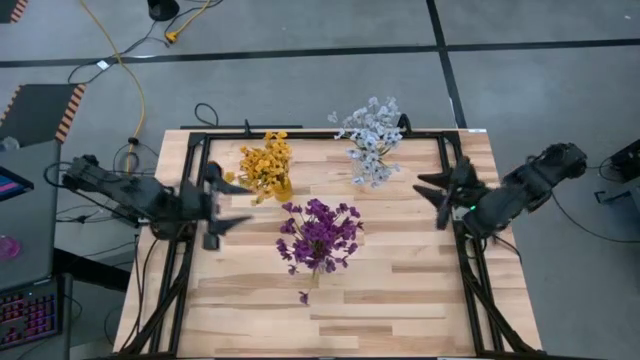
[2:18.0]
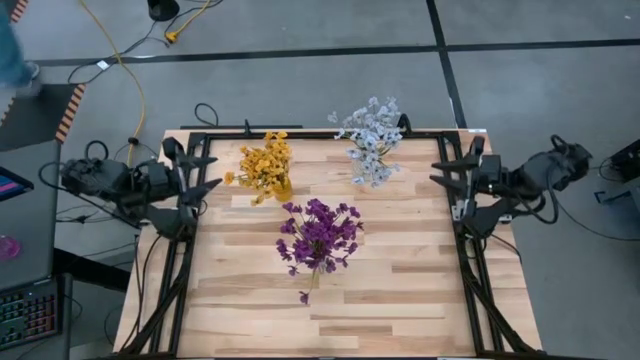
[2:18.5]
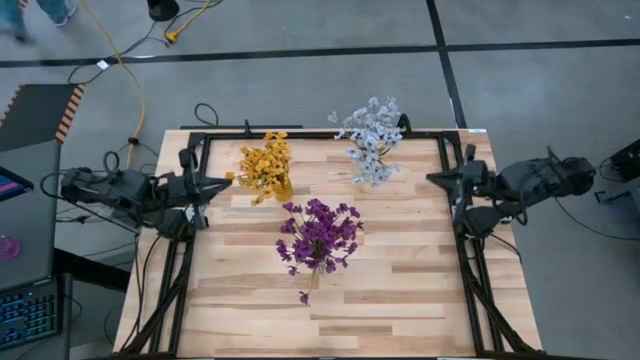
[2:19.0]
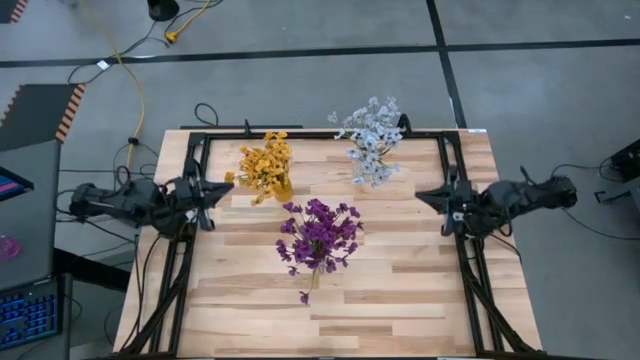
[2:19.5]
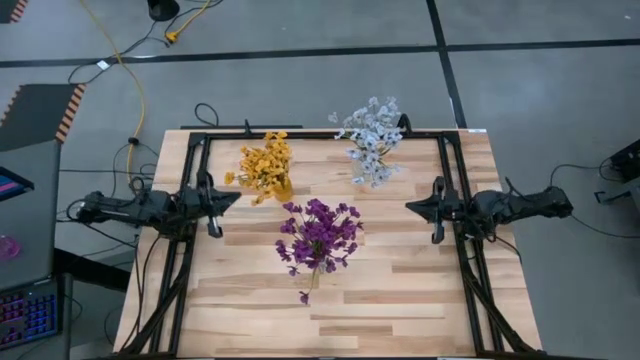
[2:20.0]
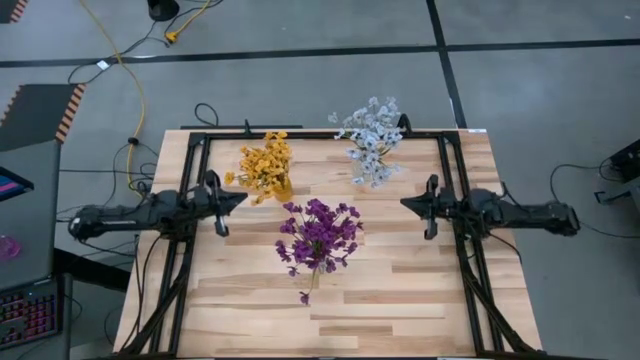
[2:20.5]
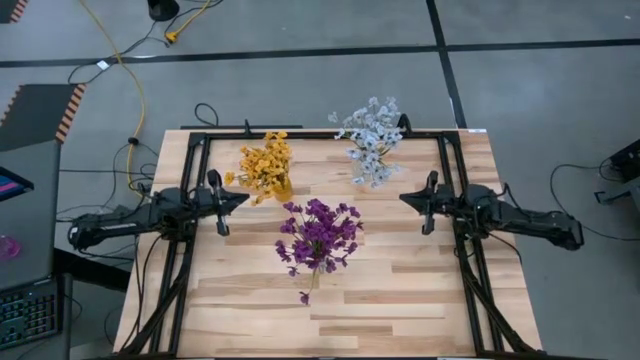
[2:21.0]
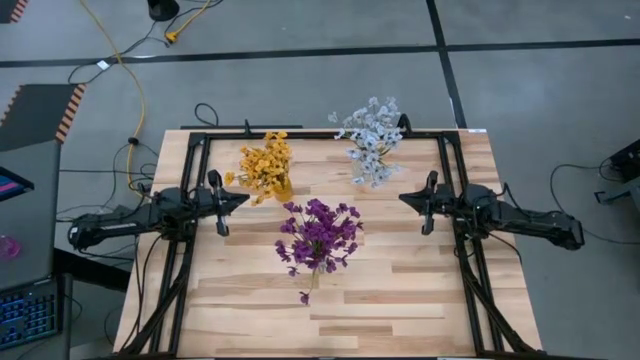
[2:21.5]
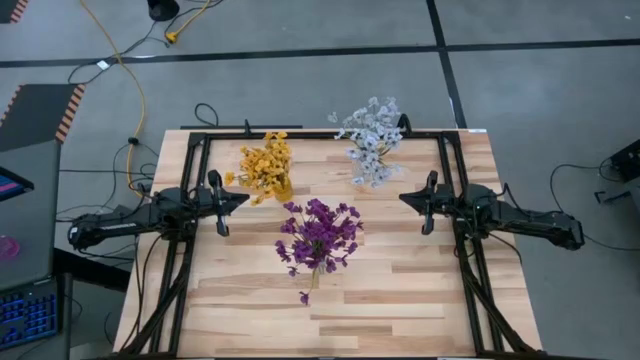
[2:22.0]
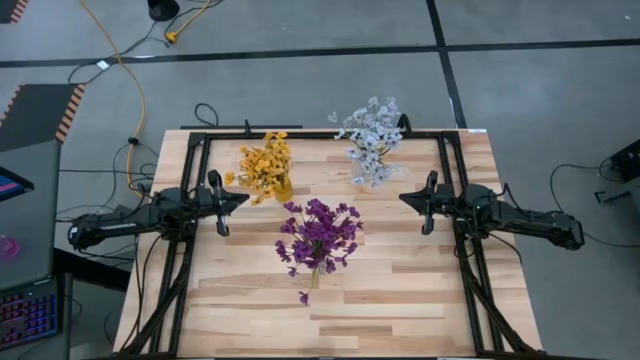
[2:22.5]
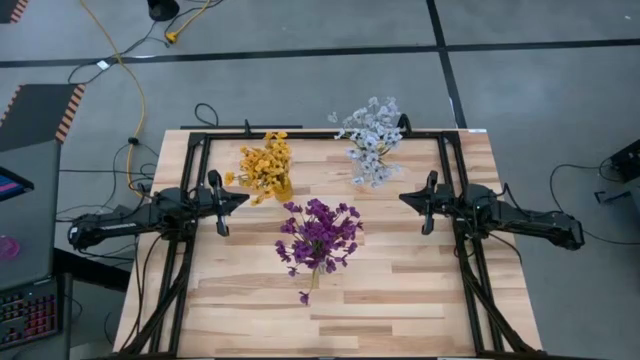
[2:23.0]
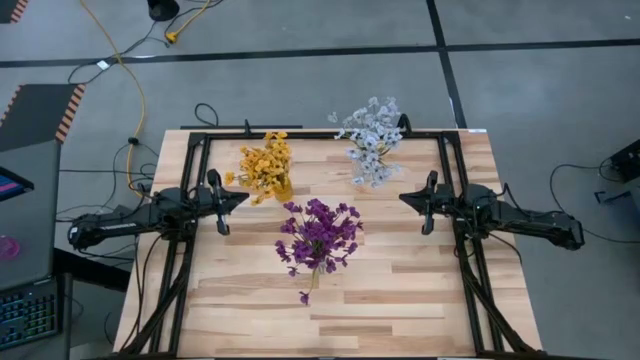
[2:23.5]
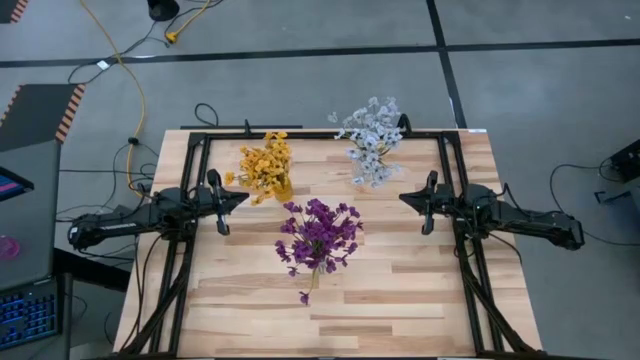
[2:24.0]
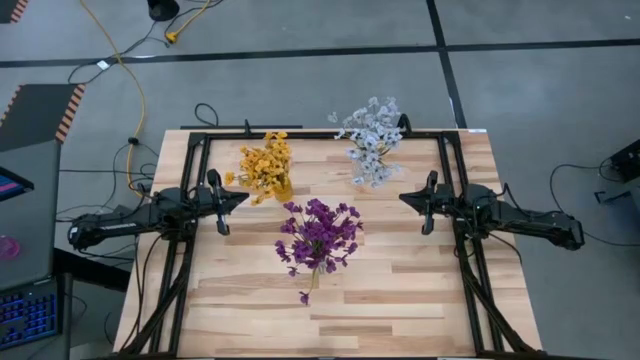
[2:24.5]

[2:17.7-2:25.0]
Task: Sort flowers into vase by color
Return to Home Position

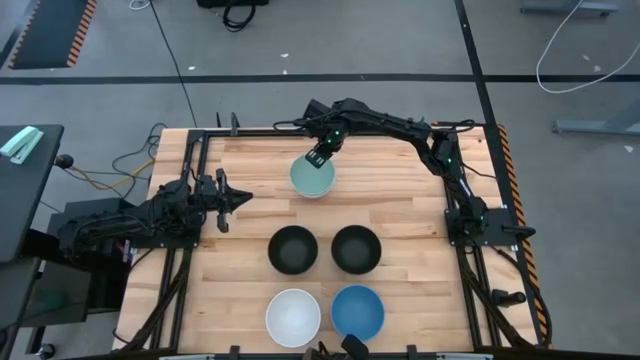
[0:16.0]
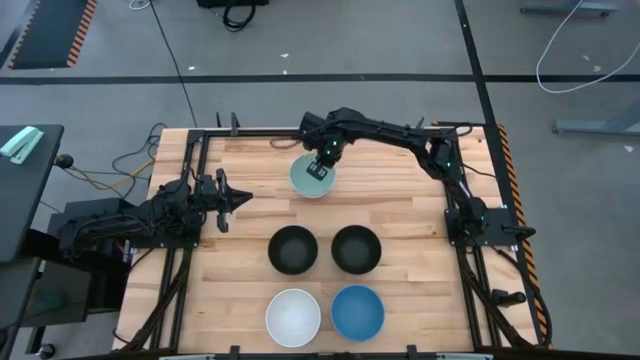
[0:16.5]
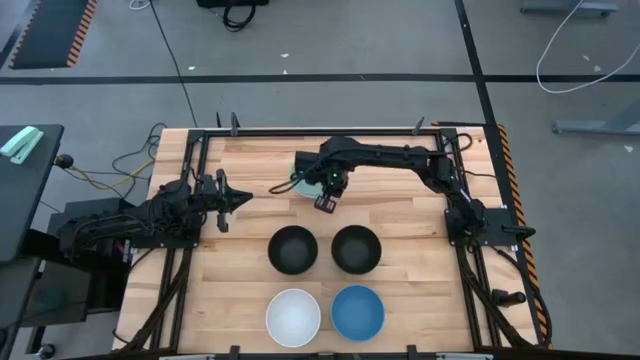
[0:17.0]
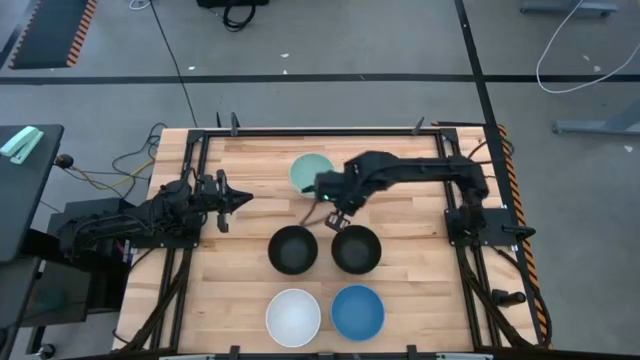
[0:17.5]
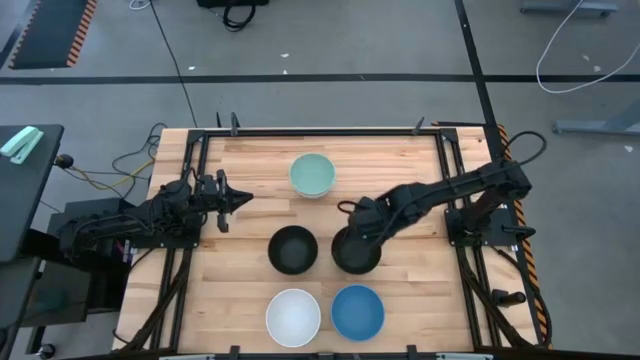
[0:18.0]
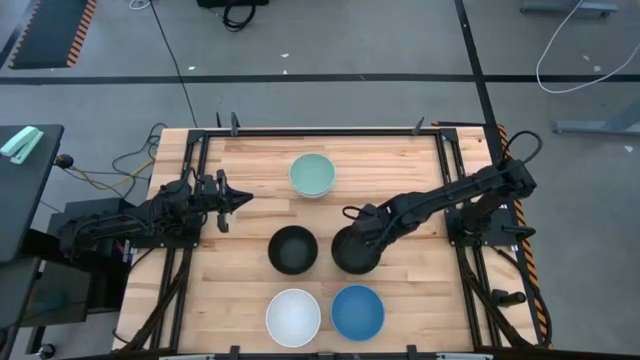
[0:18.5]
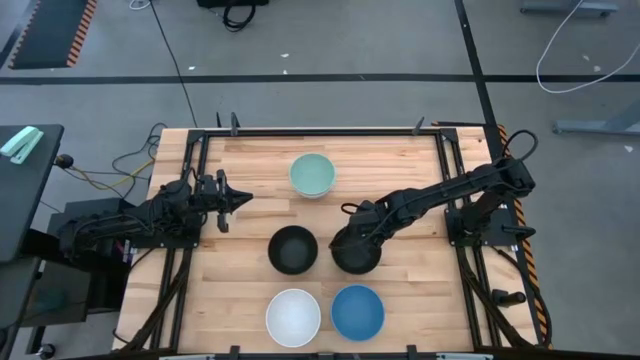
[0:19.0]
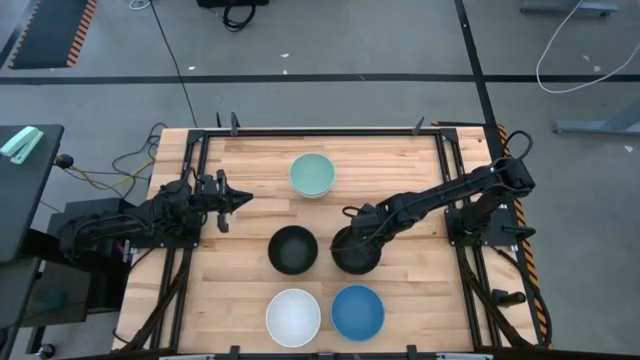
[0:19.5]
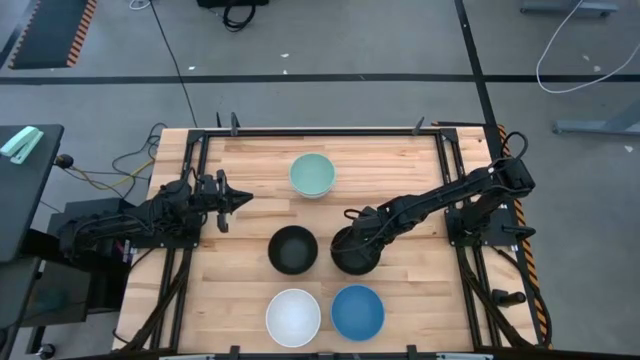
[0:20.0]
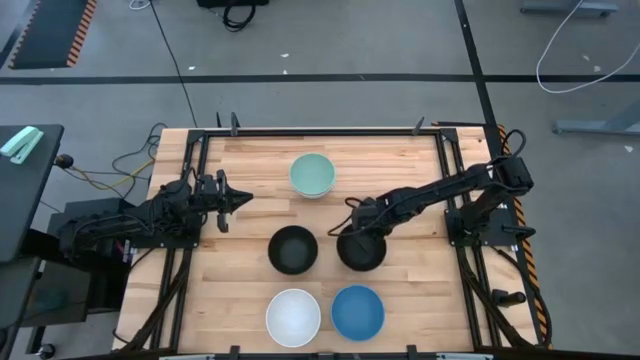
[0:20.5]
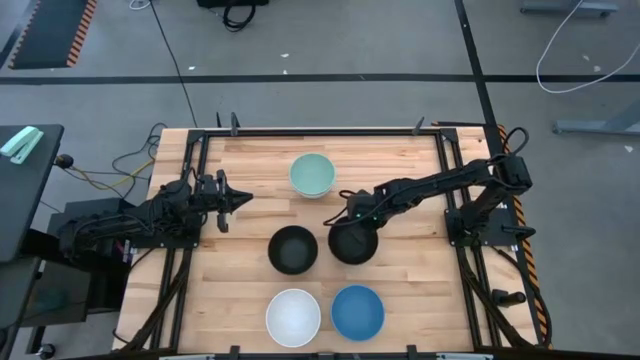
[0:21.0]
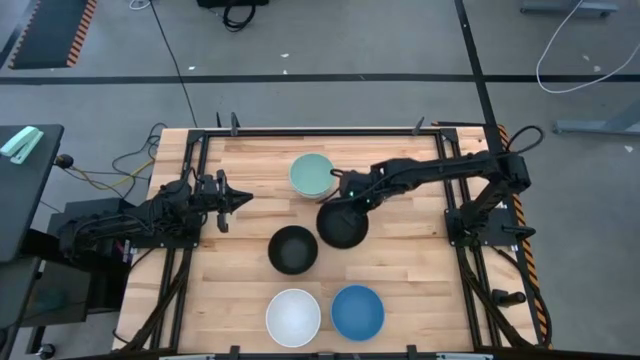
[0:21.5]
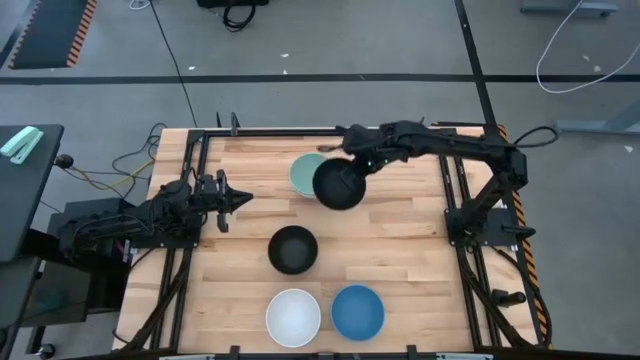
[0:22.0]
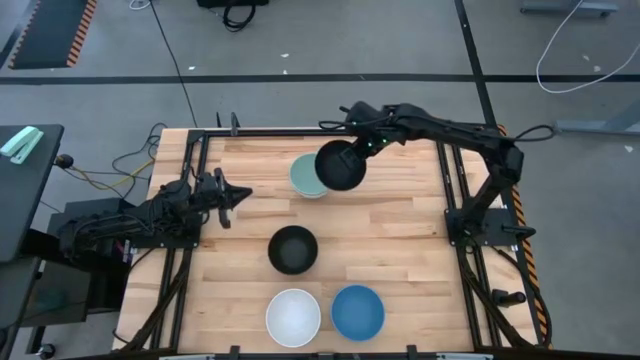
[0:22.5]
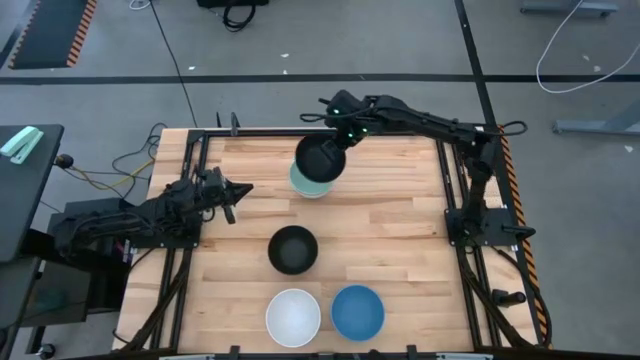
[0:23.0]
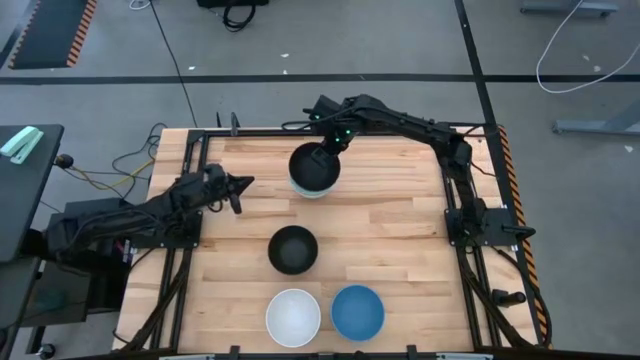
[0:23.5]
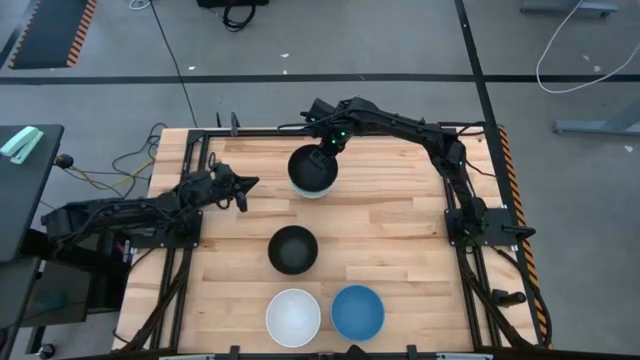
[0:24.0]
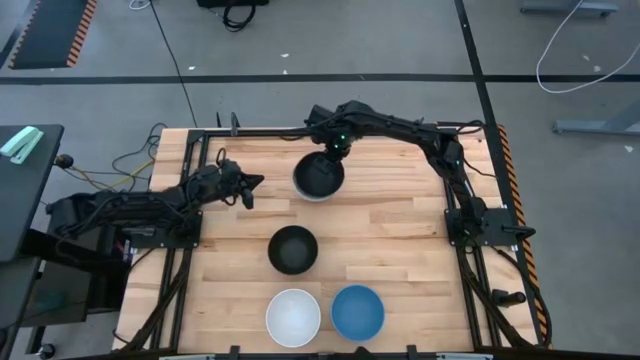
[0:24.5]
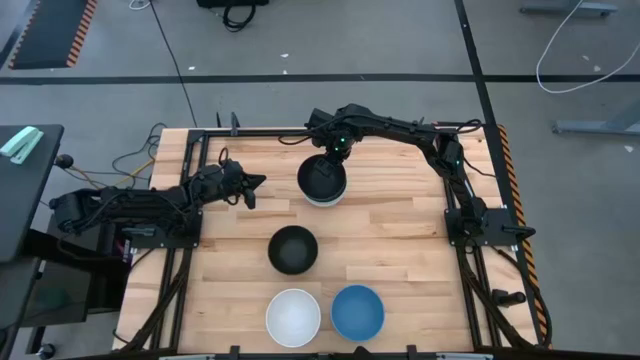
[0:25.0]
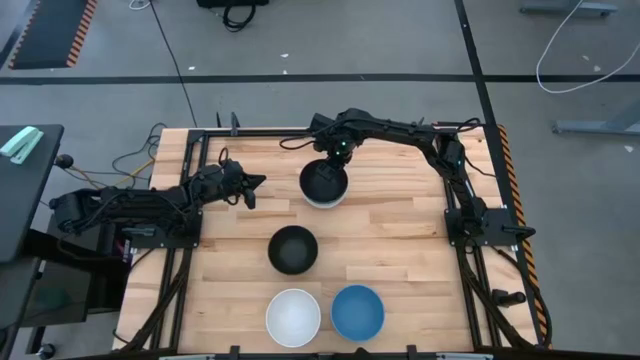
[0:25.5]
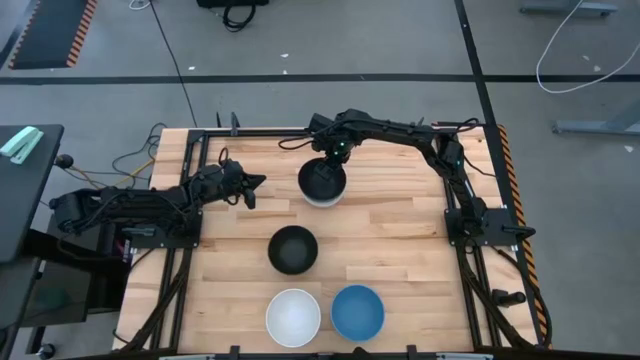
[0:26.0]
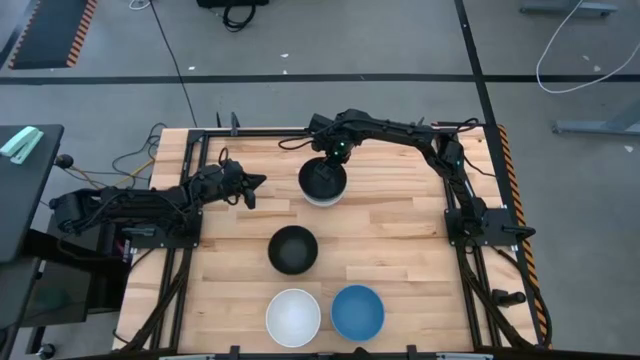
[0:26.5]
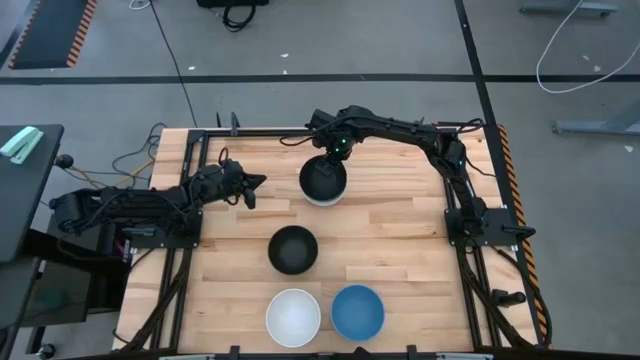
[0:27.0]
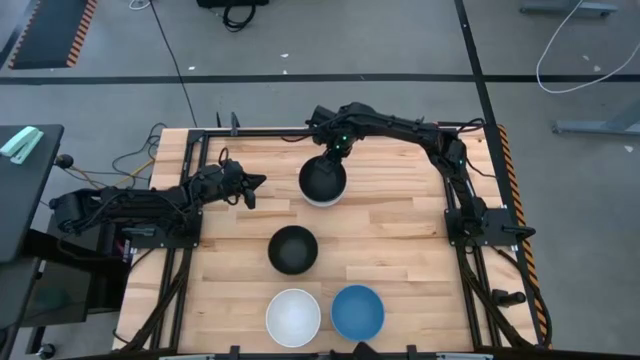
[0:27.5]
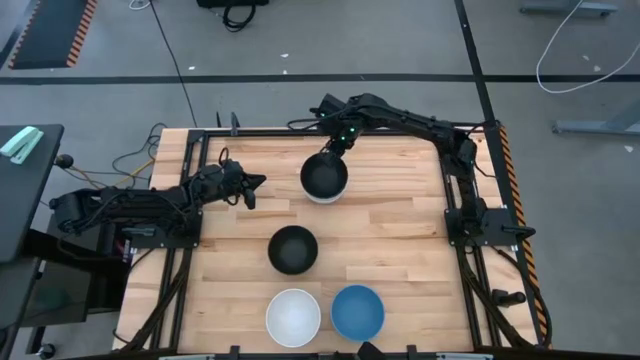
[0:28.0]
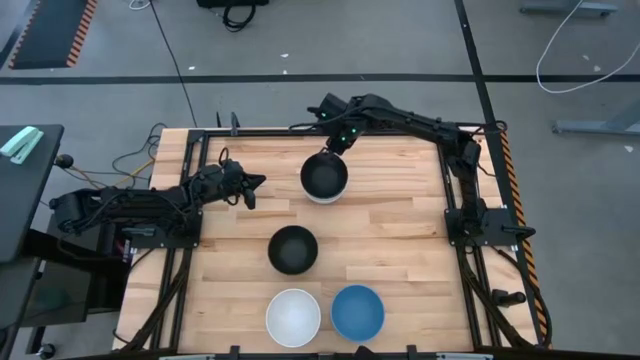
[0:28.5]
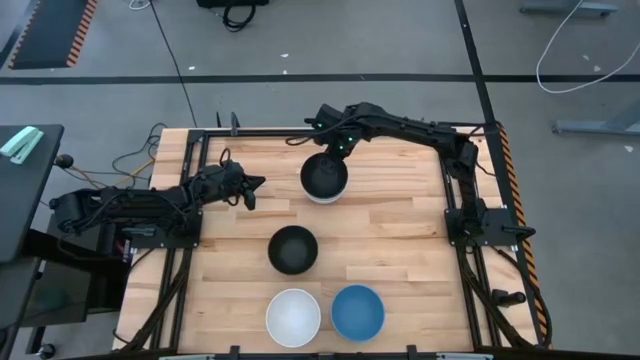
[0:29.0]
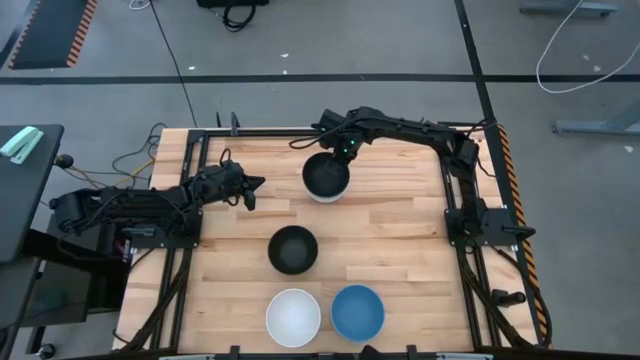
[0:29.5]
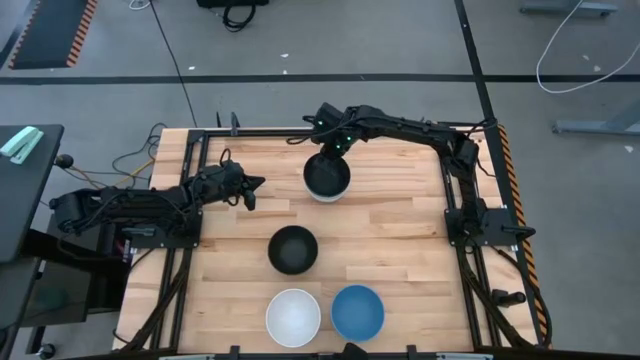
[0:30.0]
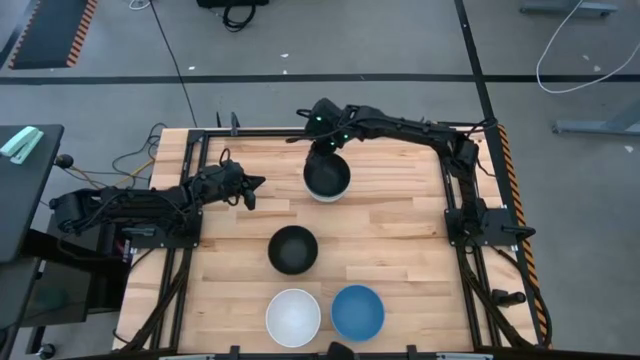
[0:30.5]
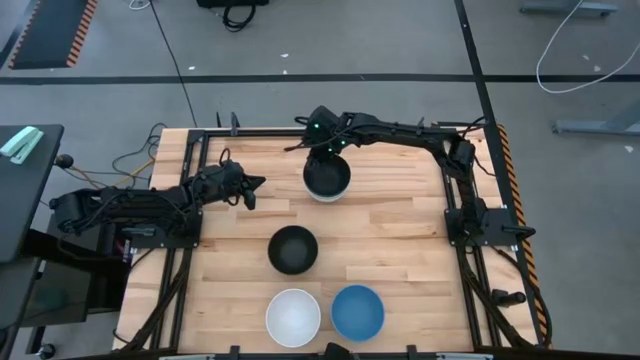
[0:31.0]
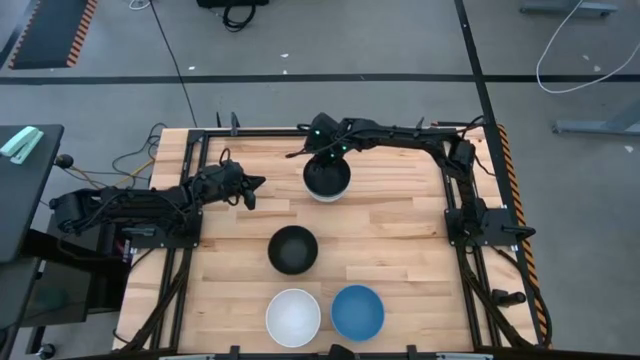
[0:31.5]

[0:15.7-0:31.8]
Task: Nest bowls inside each other
Stack the right black bowl on top of the light green bowl
